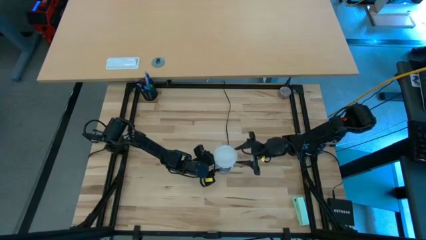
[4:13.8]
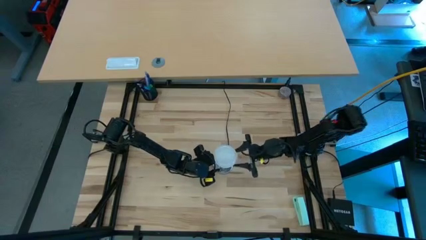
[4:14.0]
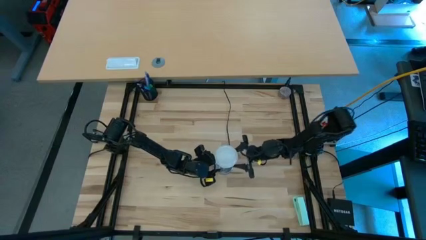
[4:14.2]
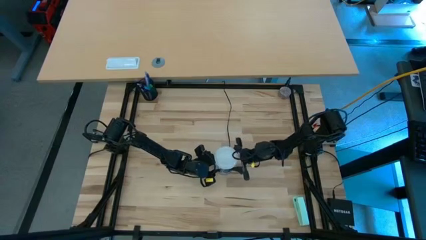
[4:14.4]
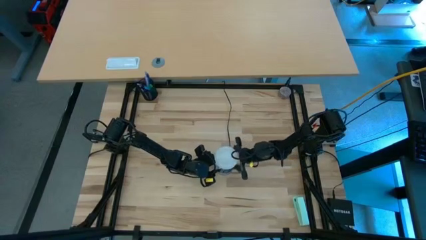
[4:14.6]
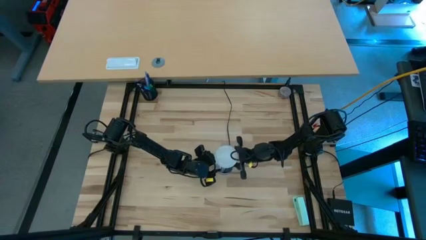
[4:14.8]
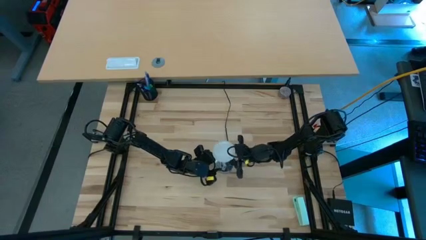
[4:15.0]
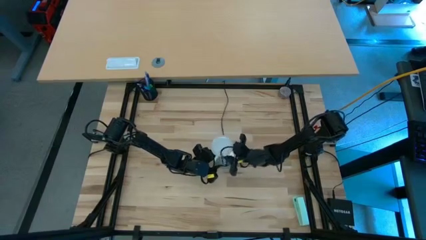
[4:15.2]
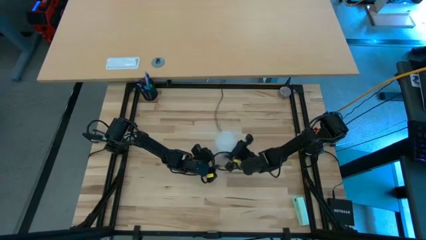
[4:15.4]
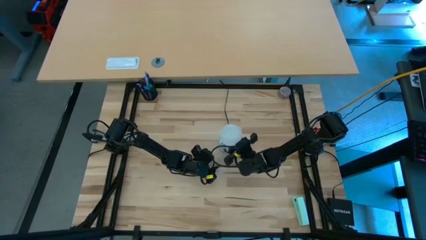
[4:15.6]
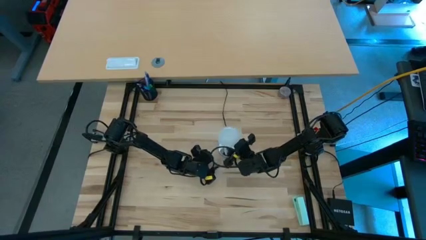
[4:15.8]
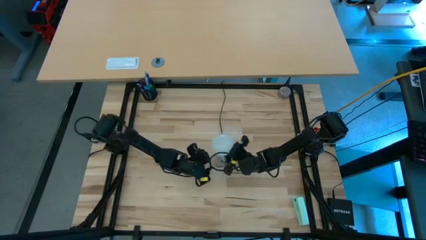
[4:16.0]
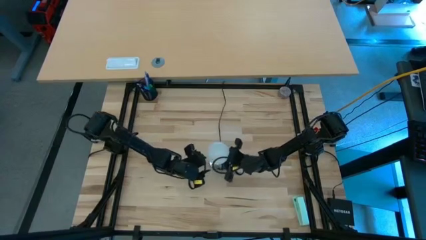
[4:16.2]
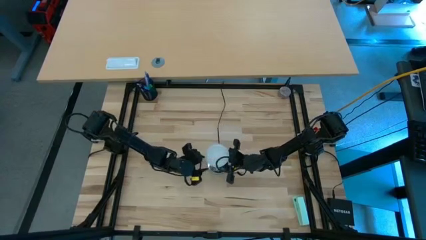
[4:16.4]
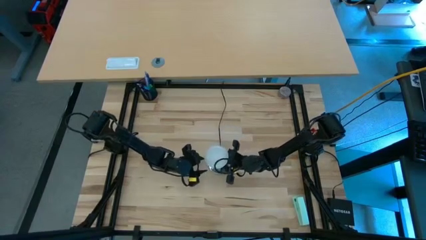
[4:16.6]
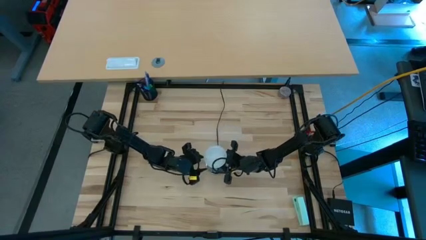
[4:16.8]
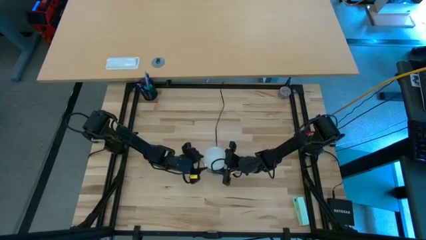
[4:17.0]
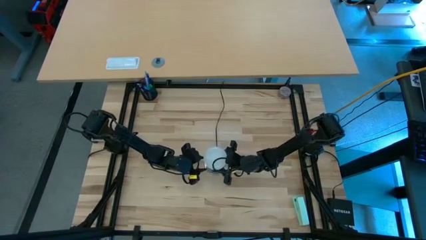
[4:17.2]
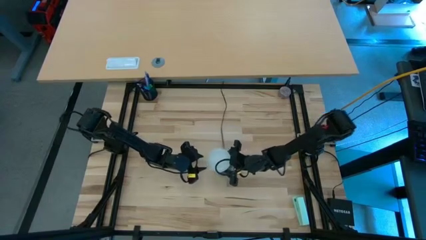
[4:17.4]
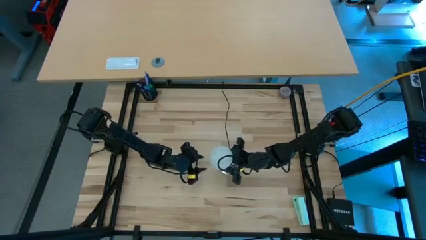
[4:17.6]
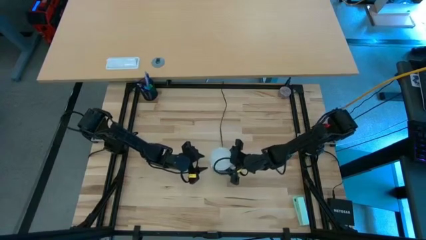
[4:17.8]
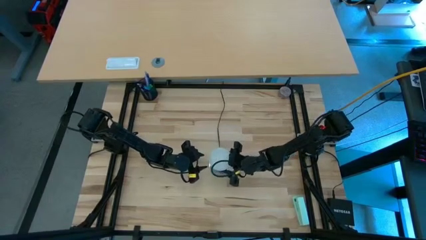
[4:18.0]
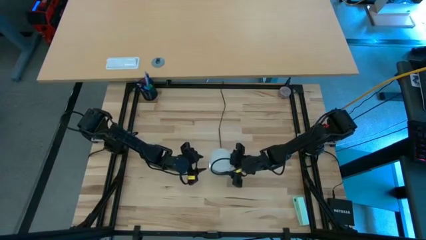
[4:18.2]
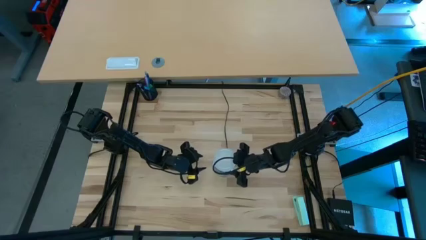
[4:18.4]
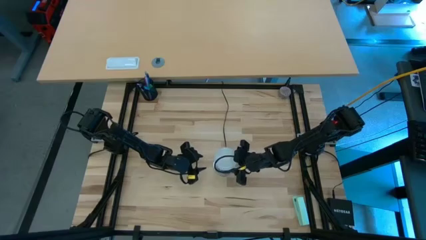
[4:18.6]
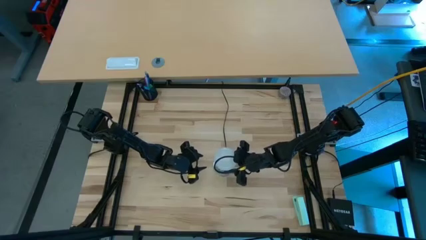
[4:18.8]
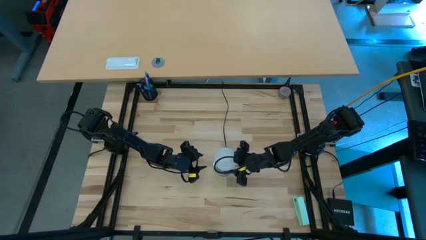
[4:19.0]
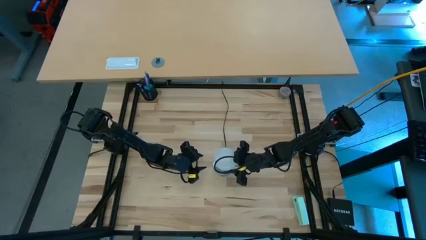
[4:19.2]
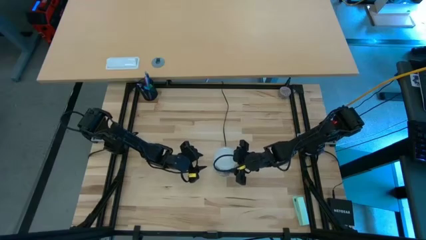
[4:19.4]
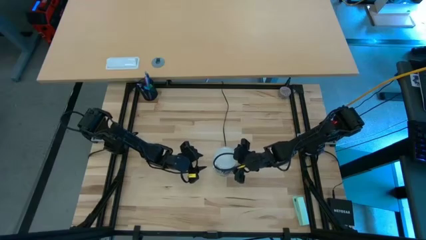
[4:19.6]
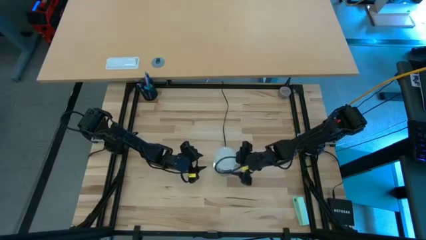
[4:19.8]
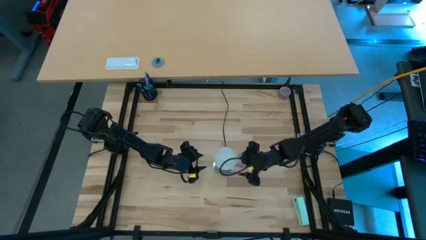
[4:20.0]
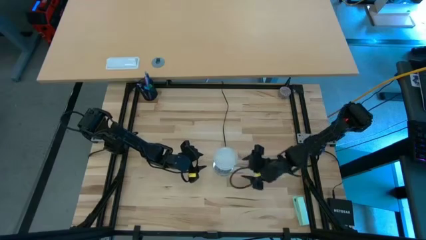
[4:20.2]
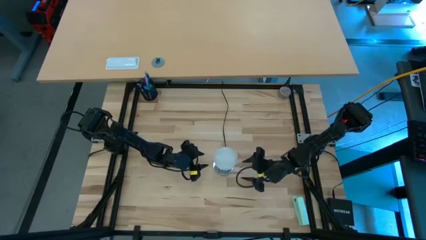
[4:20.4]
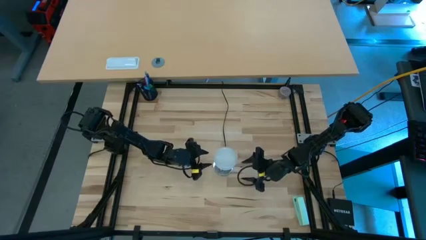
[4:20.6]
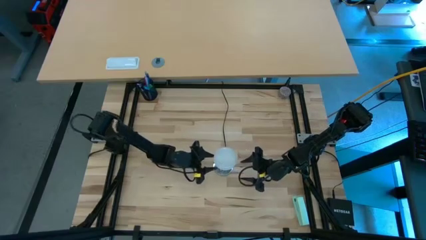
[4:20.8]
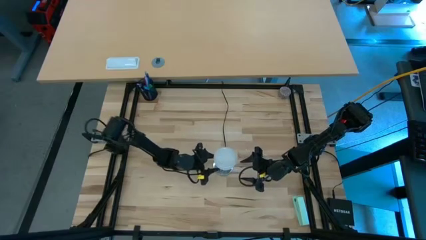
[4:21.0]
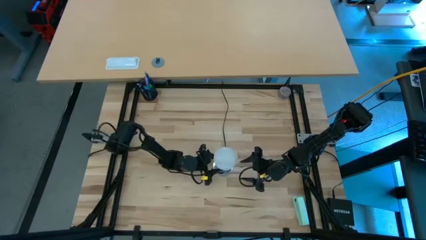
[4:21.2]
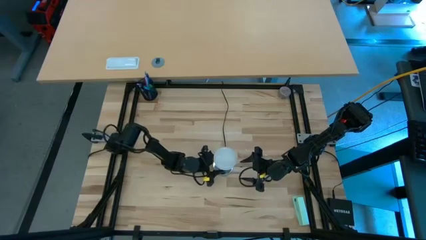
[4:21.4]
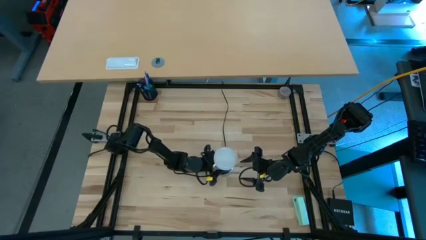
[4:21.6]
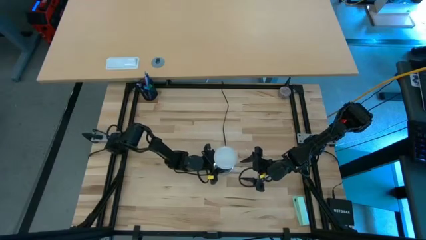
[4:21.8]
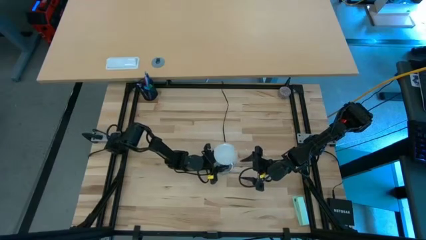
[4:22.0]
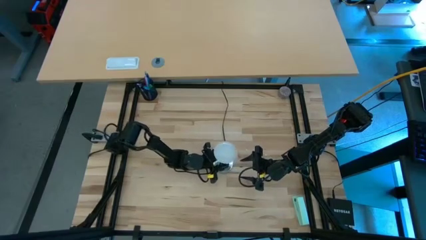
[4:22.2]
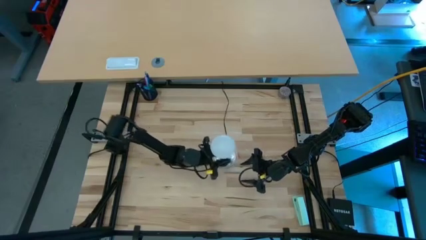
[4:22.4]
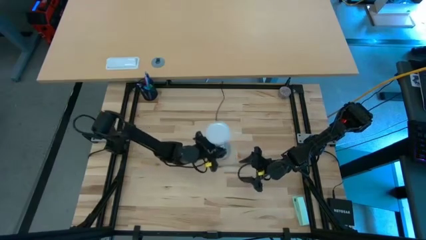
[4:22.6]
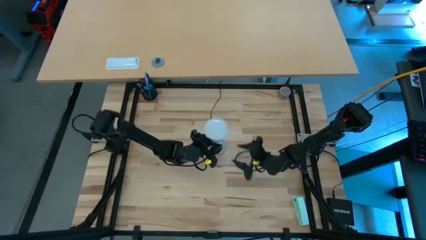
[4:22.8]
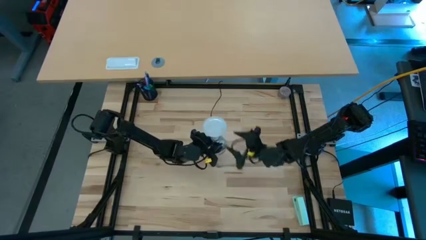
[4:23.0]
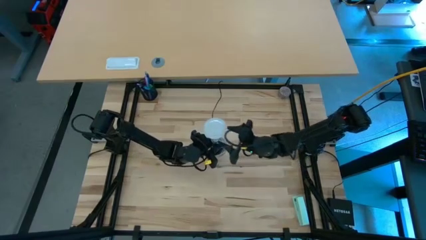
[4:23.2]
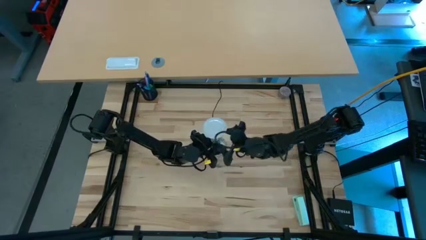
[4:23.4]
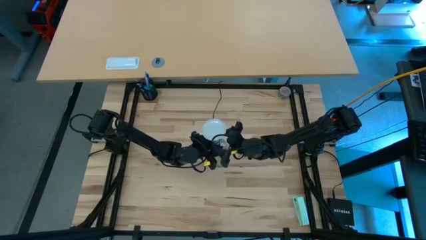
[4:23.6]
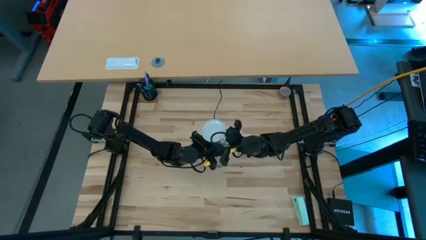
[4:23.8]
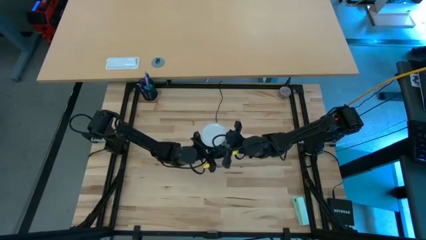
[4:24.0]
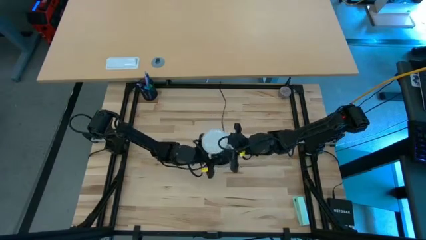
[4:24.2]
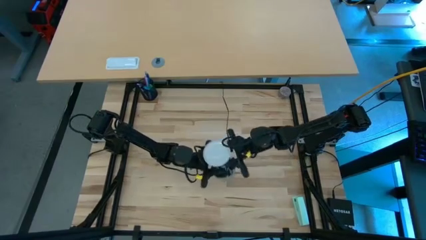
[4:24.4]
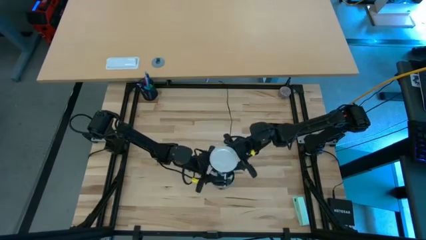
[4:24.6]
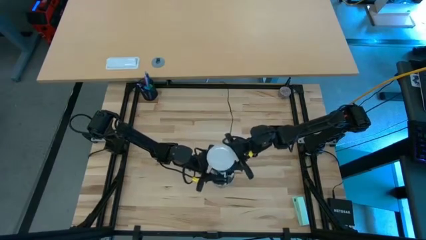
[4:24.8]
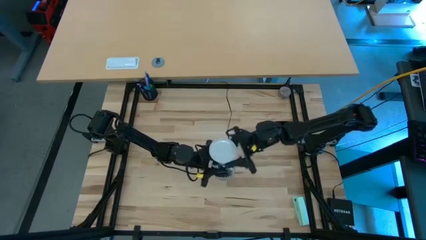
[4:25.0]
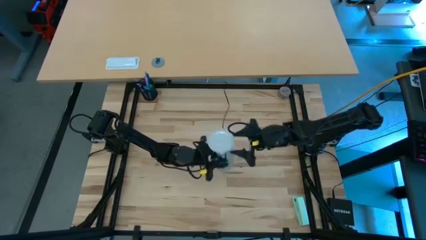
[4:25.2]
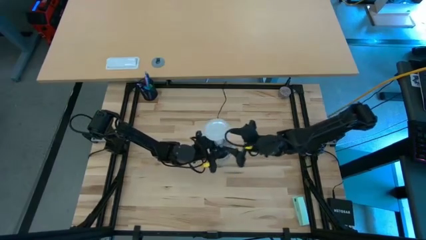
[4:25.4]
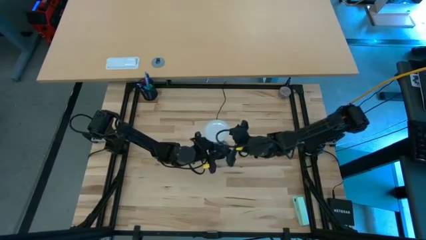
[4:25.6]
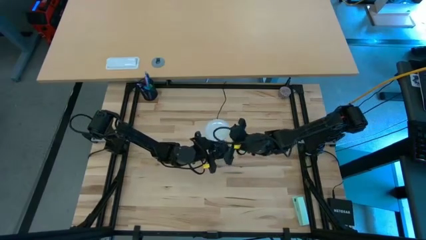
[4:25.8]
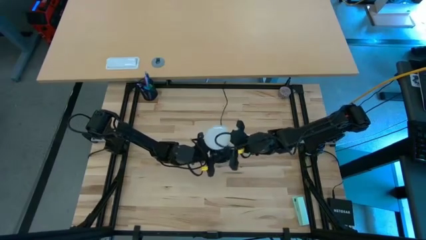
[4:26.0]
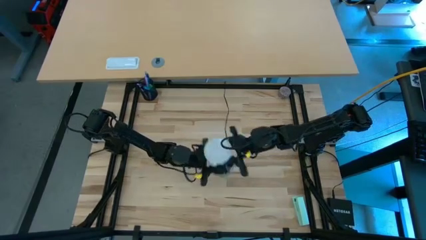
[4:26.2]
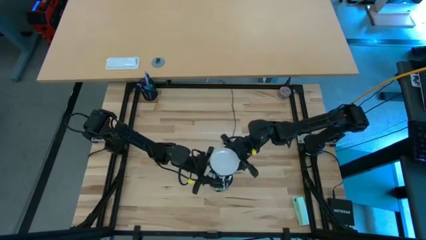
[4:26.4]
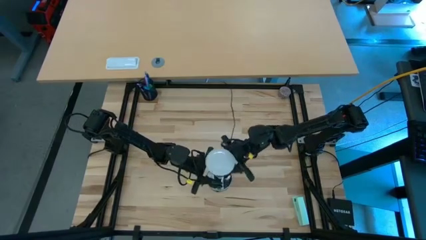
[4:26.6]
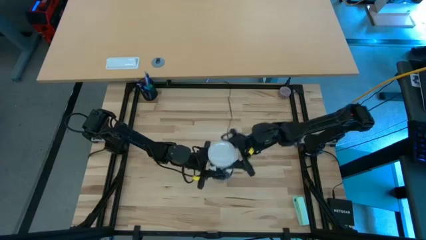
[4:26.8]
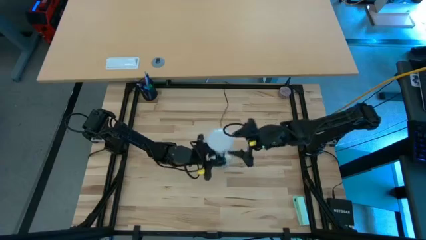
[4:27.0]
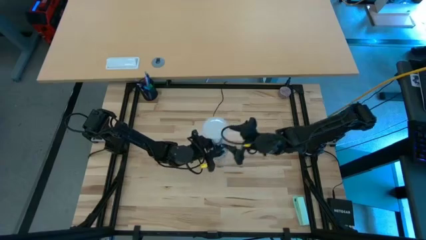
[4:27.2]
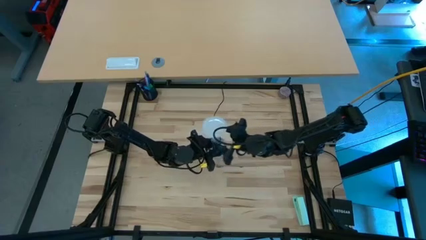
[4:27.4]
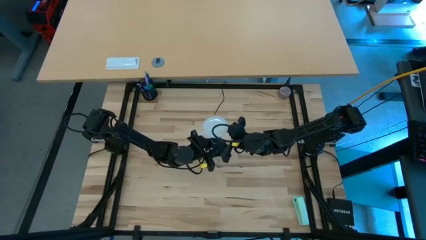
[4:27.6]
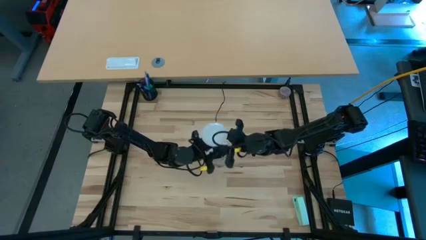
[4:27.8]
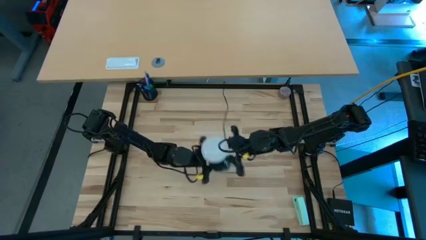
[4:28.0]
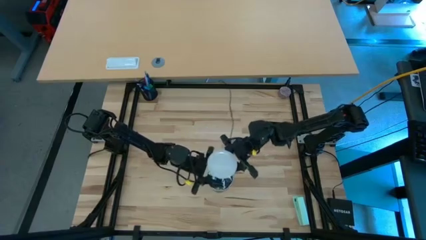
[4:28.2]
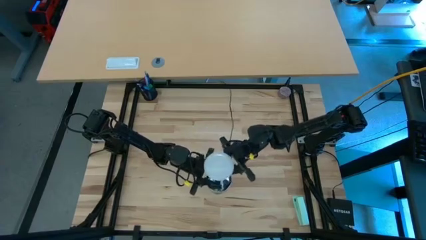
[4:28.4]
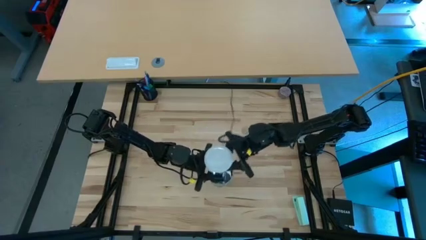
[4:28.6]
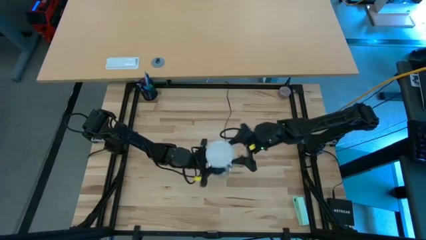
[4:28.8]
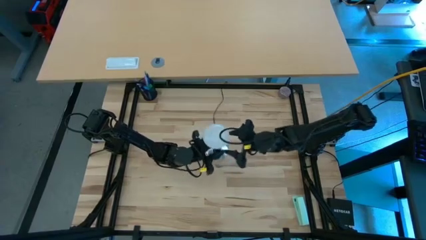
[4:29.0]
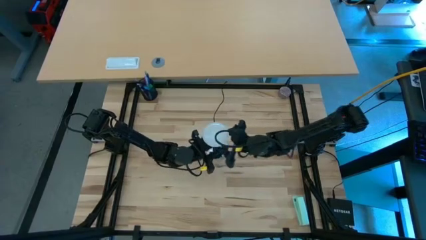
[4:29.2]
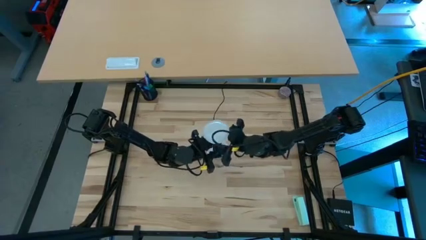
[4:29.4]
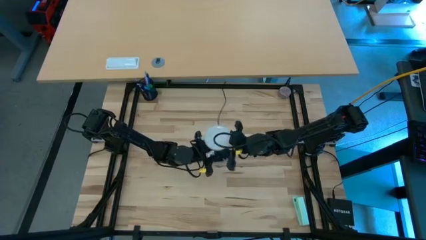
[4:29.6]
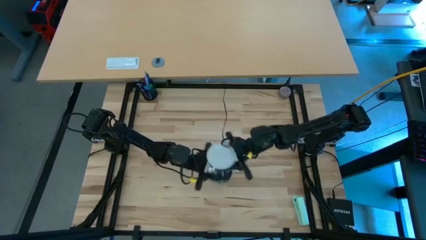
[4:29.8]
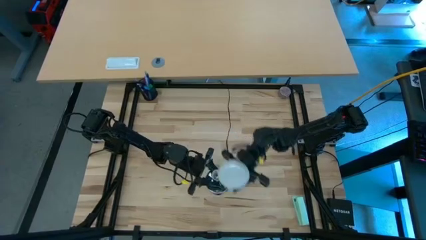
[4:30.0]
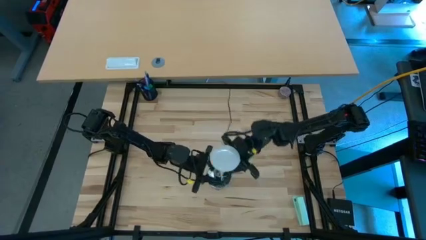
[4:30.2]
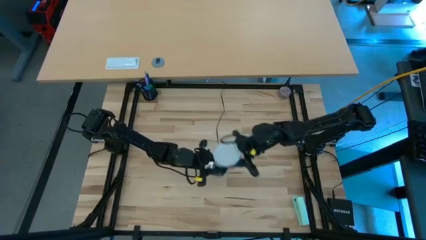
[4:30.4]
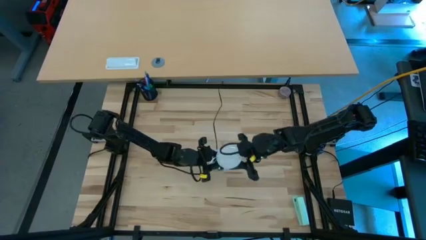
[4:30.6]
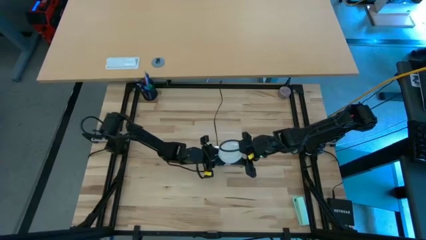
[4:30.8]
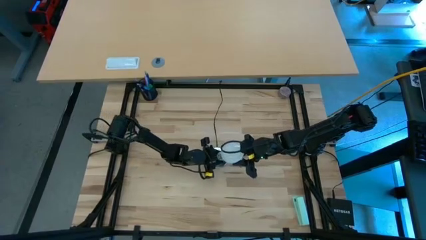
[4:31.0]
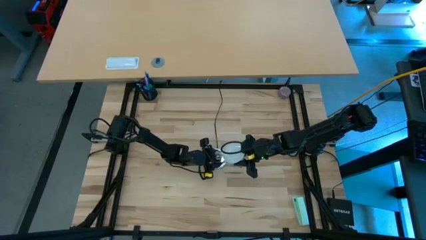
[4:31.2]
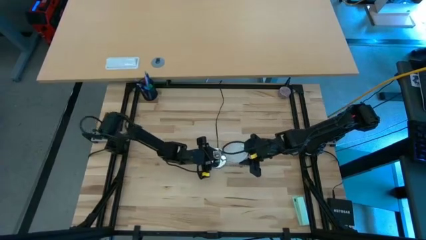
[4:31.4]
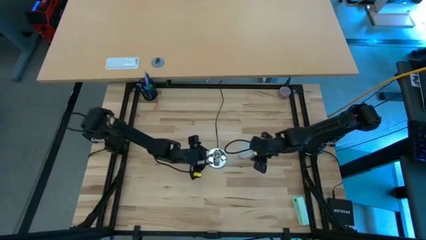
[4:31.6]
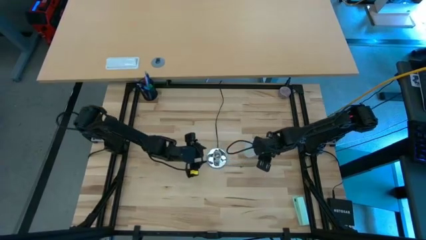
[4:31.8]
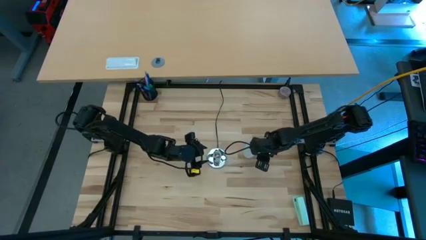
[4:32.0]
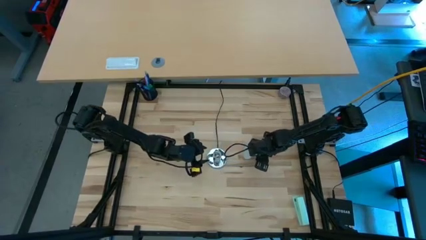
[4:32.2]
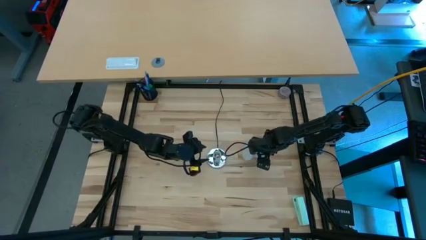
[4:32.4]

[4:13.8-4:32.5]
Task: Screw lightbulb
Remove the lightbulb from the lamp
